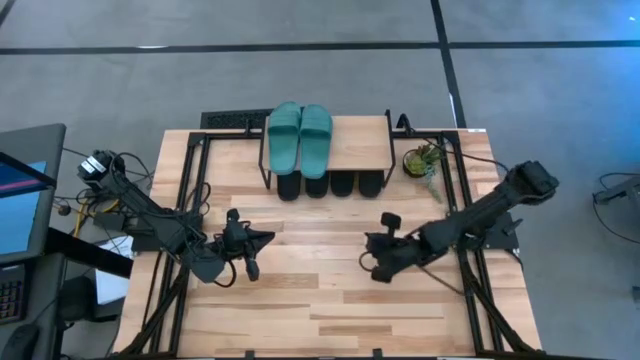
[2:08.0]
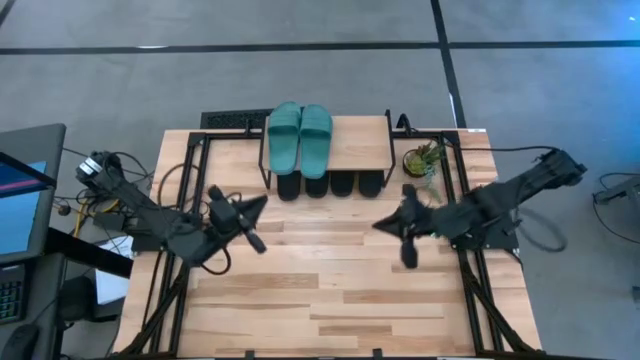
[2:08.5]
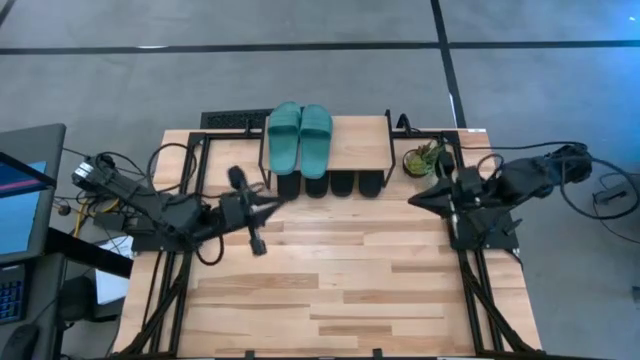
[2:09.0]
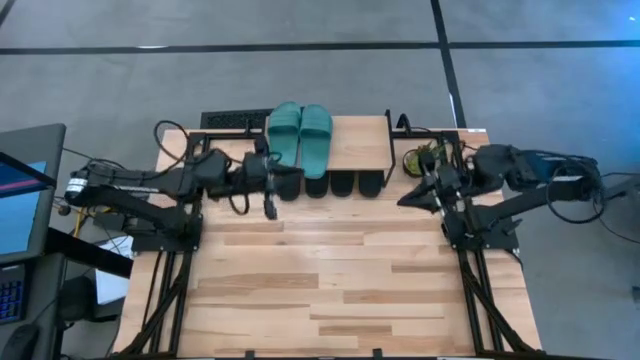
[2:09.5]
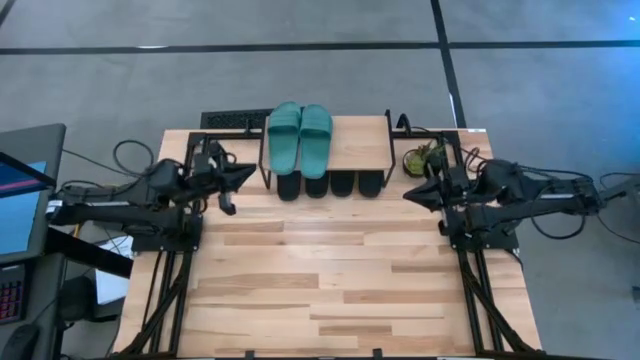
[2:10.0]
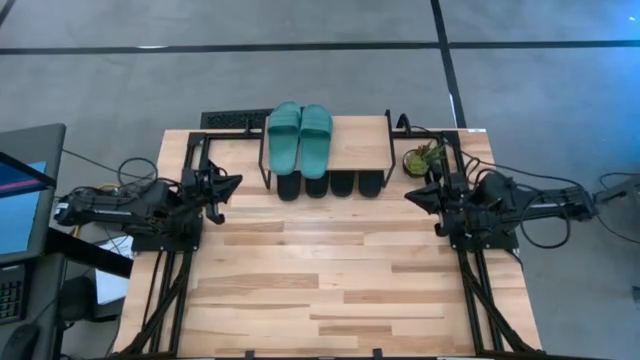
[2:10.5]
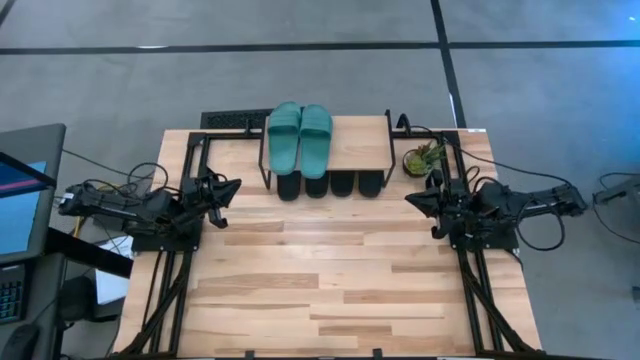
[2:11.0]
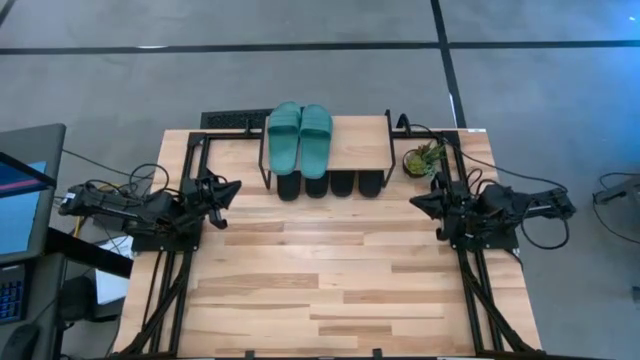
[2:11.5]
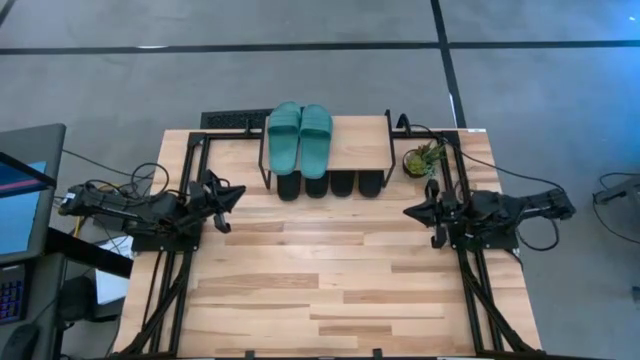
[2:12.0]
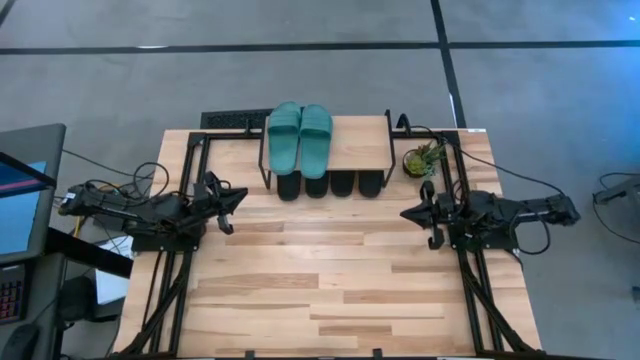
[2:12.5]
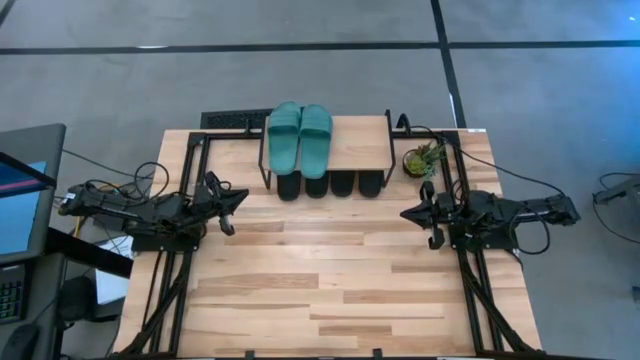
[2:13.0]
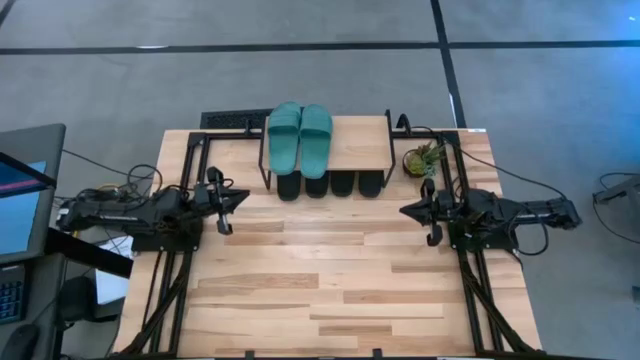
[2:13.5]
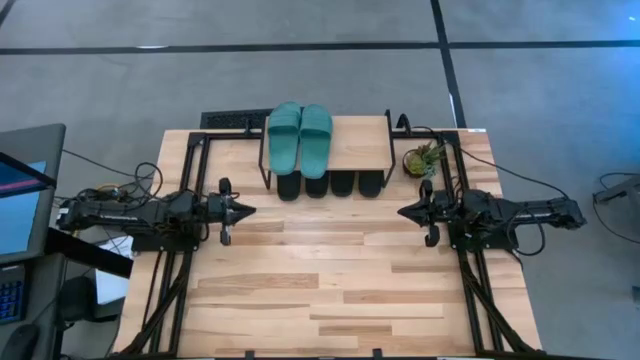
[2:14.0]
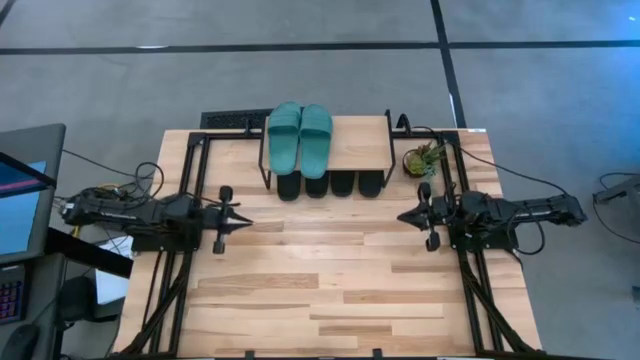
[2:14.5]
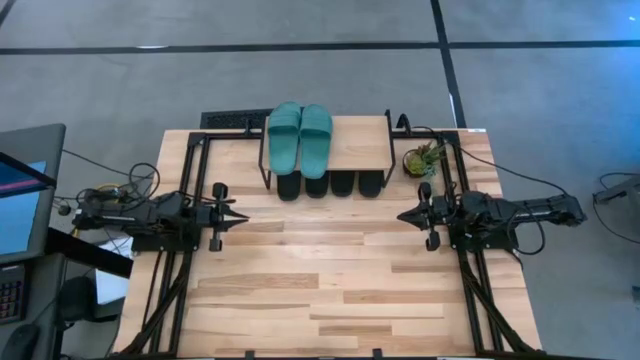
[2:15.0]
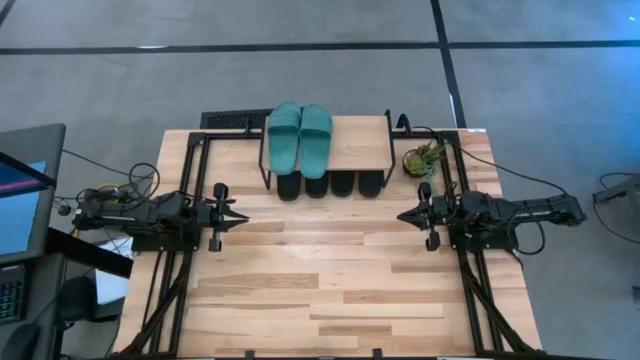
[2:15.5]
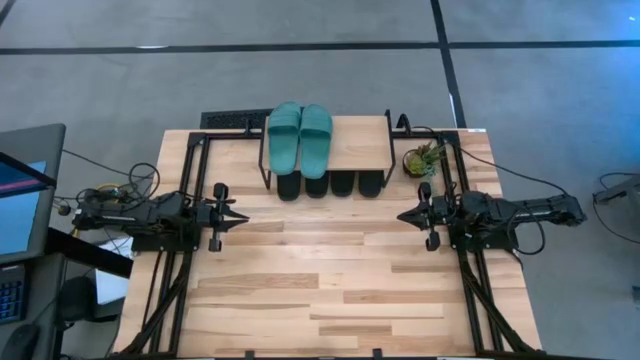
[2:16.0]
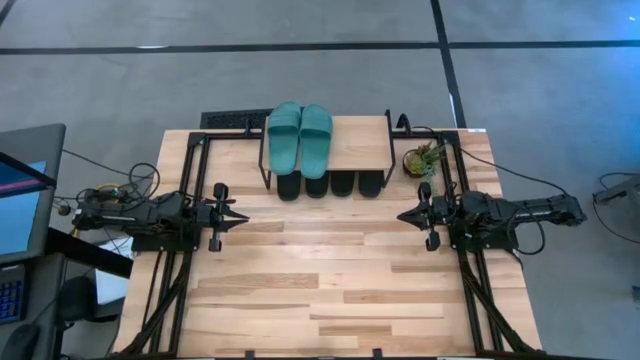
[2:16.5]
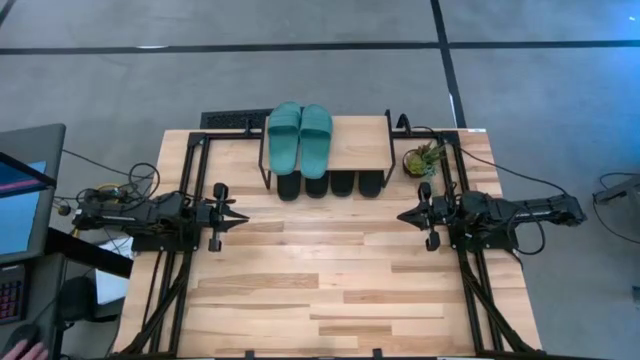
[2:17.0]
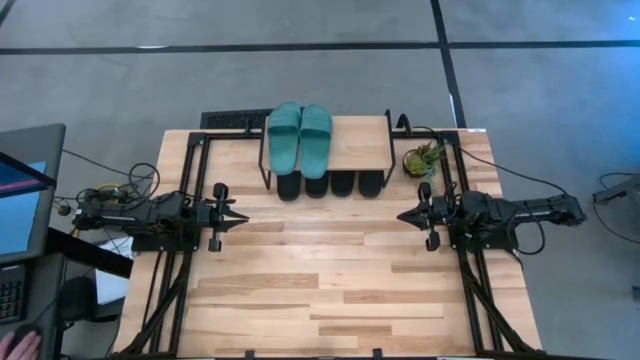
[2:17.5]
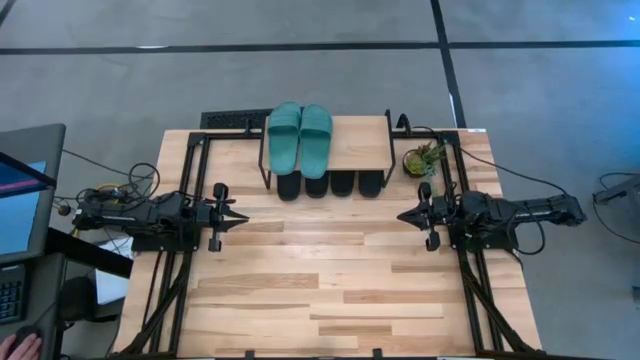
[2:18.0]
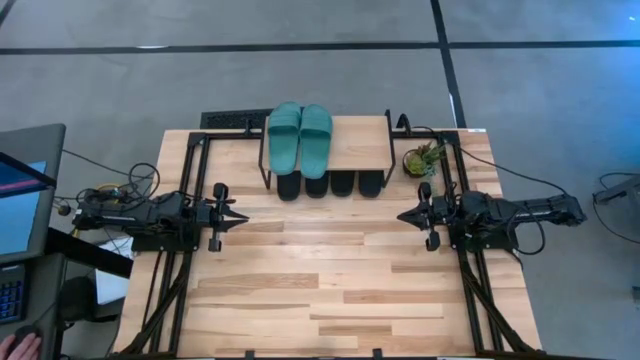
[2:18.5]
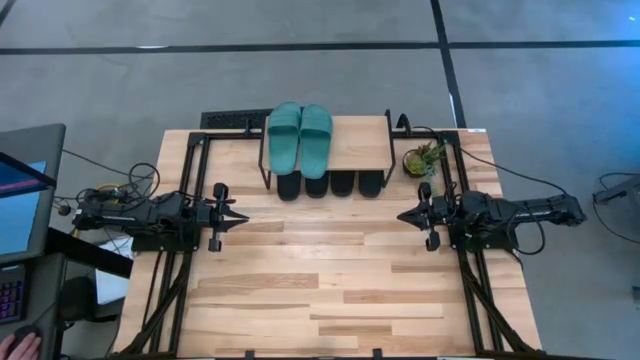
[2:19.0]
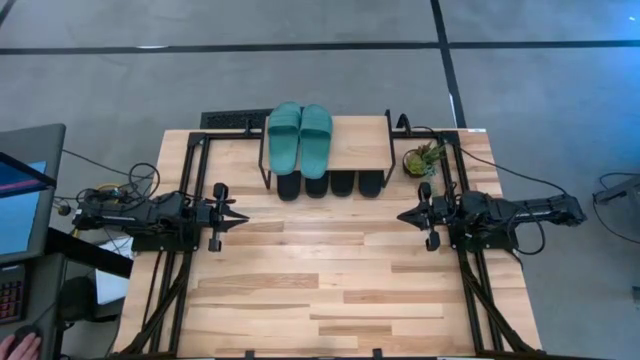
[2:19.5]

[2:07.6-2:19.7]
Task: Pick and place slides into the shelf
Return to Home Position

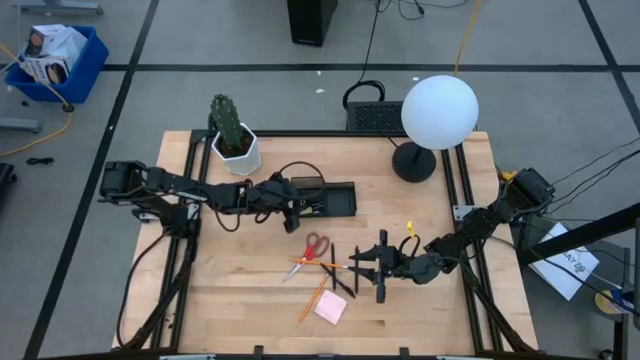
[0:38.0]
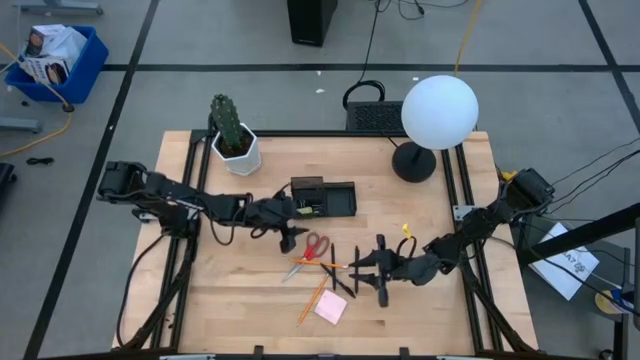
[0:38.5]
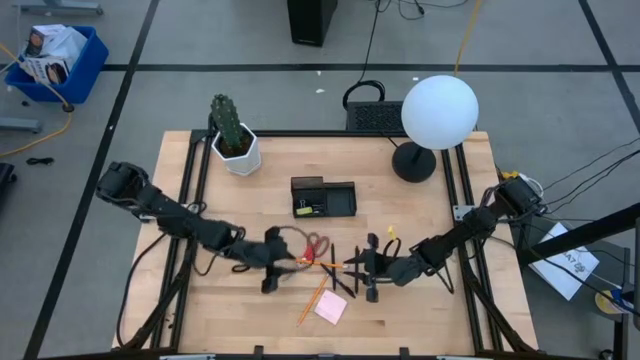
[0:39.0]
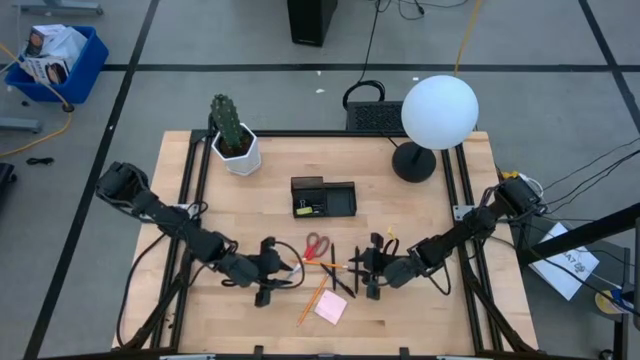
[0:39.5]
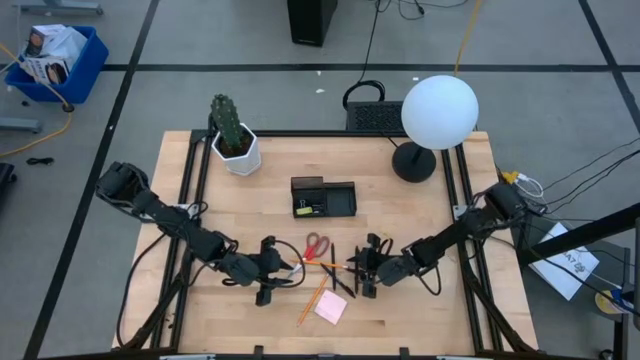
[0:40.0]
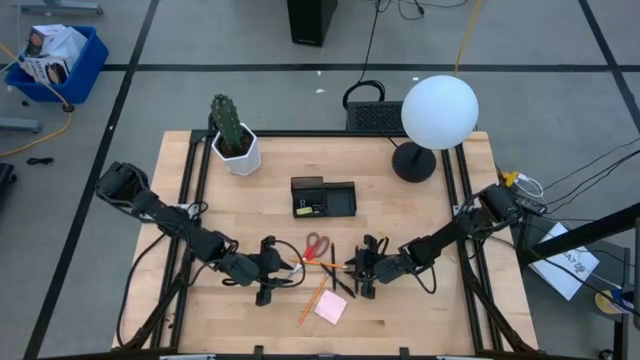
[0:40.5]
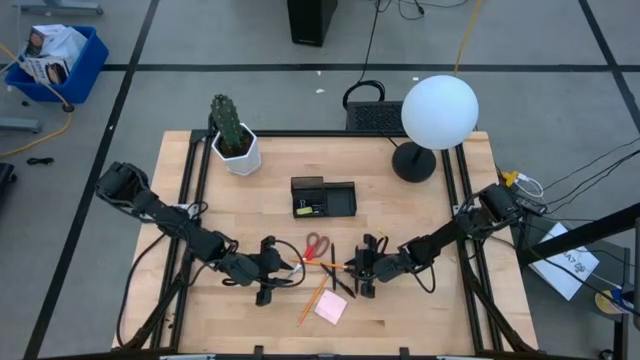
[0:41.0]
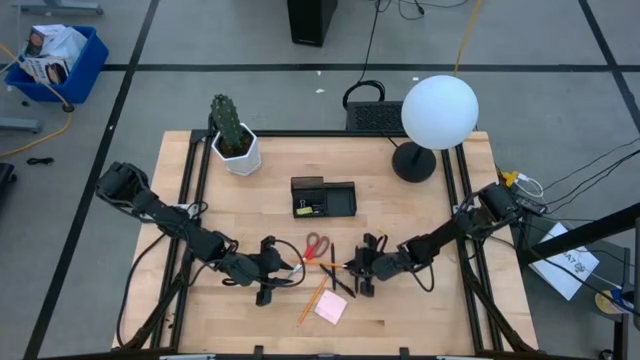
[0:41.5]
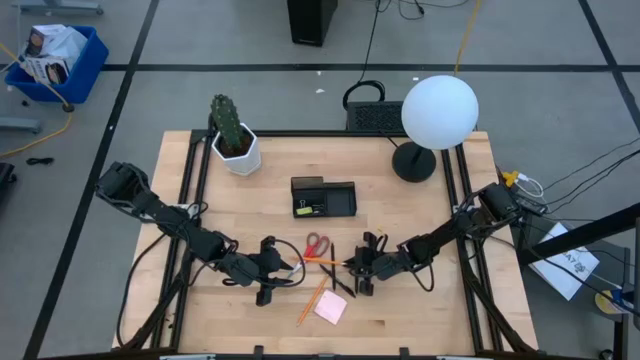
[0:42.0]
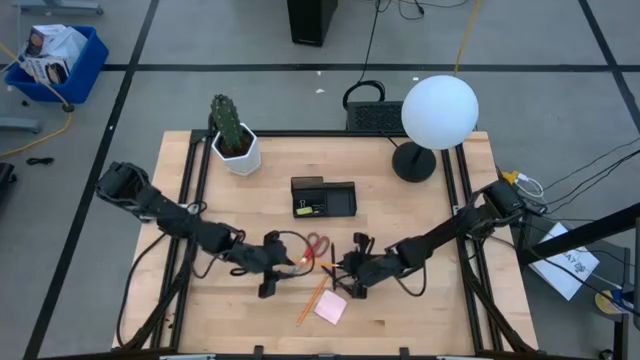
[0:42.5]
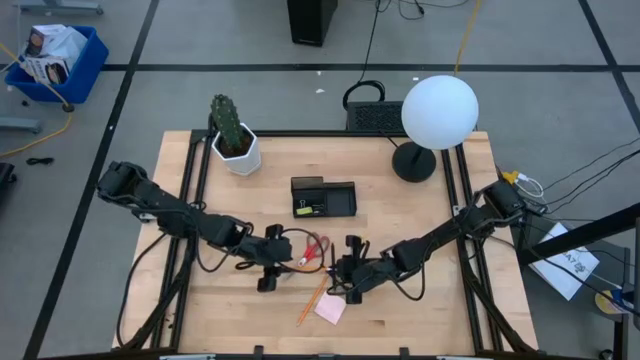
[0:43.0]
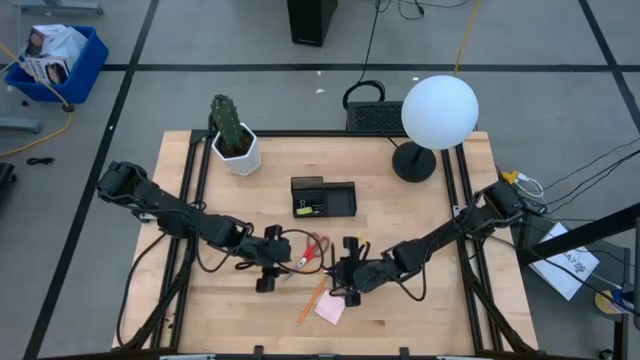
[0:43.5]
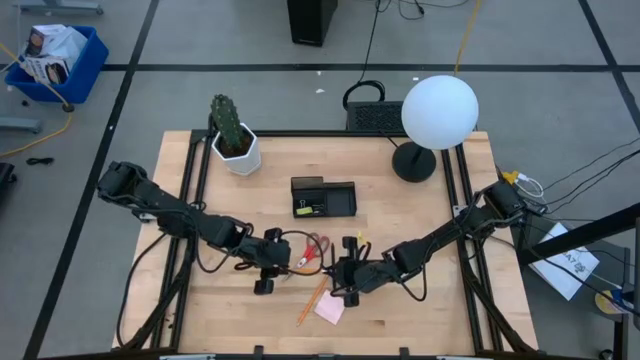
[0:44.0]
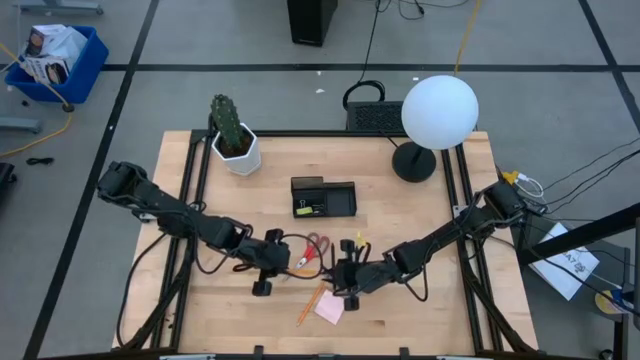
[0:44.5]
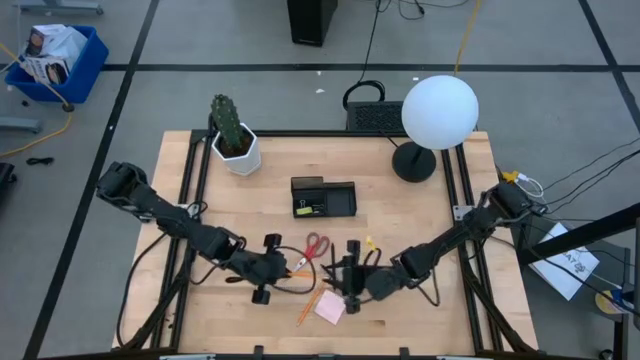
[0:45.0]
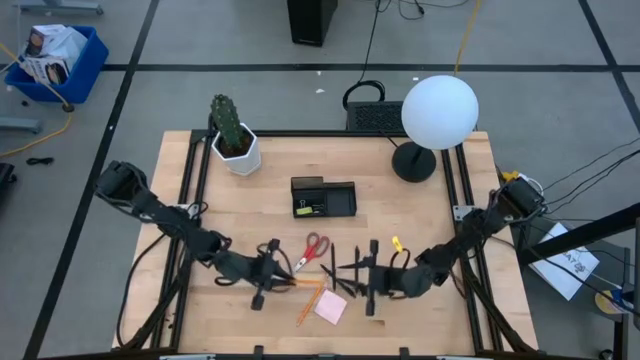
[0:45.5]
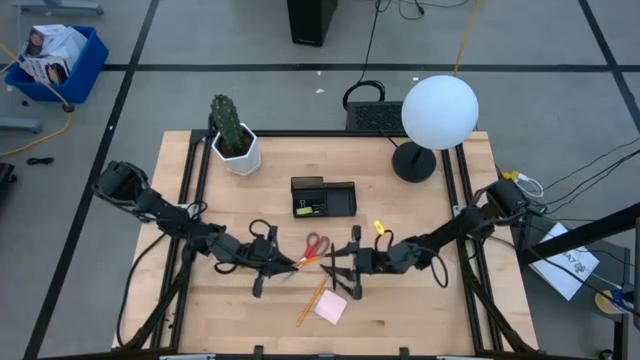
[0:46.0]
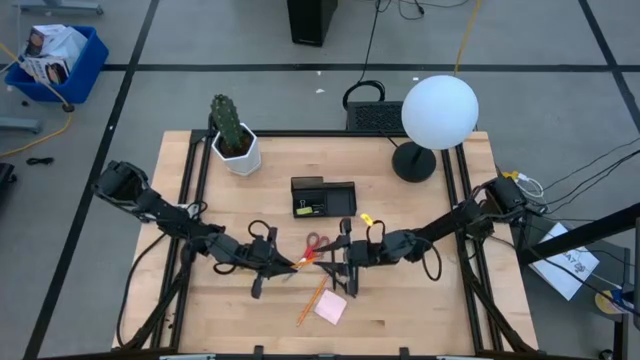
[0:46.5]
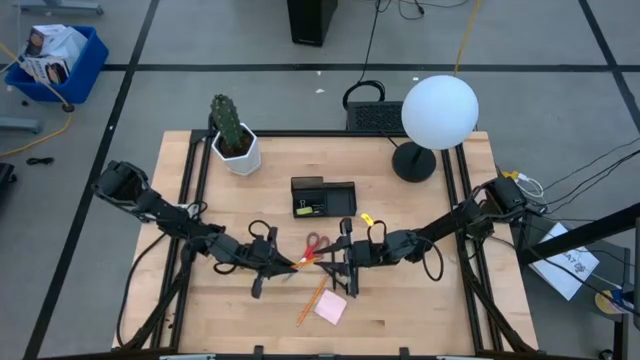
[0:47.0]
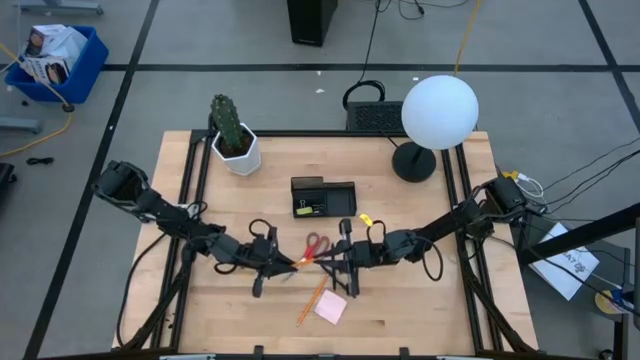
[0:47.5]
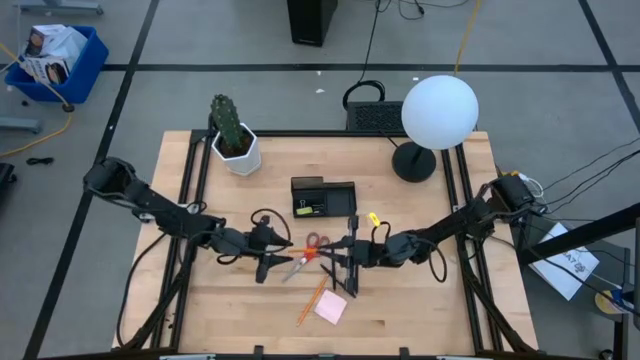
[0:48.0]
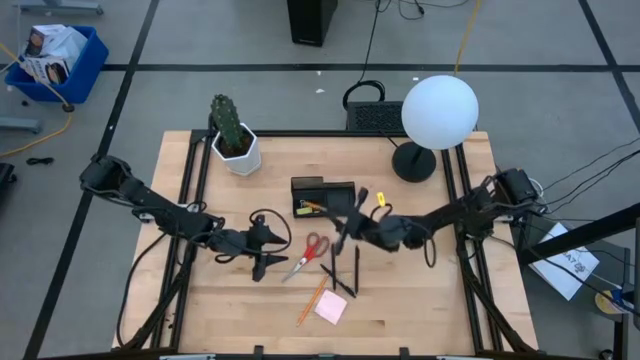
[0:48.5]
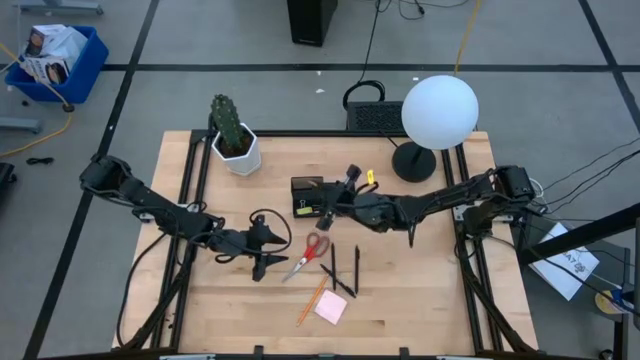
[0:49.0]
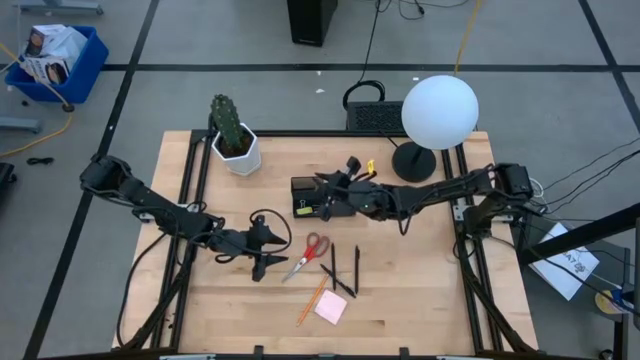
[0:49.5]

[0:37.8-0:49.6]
Task: Pick and place office supplies into organizer
Put the top orange pencil into the top left of the desk organizer
